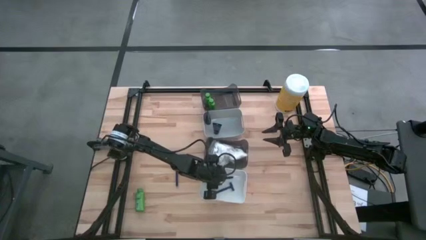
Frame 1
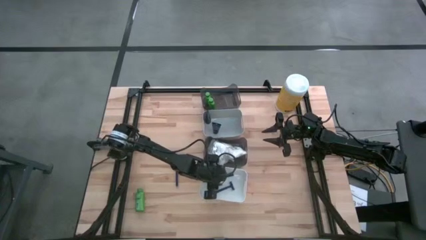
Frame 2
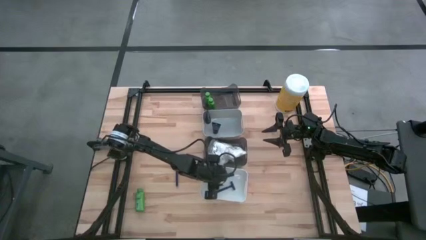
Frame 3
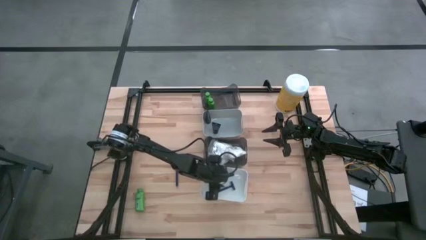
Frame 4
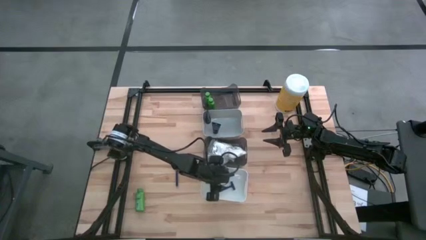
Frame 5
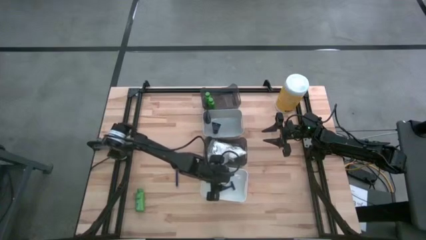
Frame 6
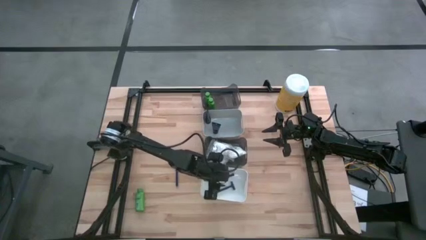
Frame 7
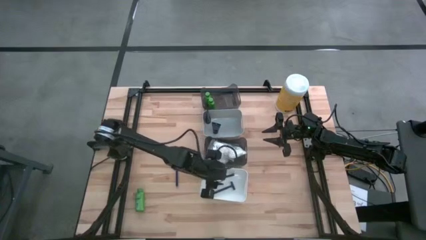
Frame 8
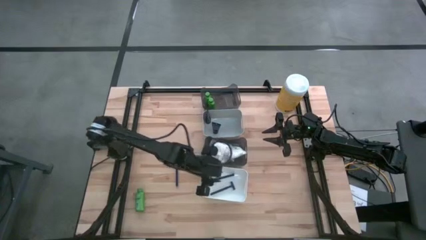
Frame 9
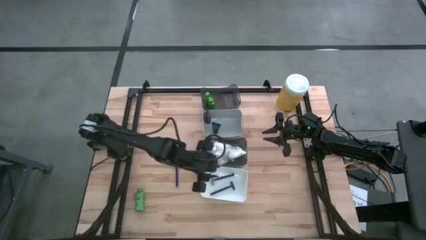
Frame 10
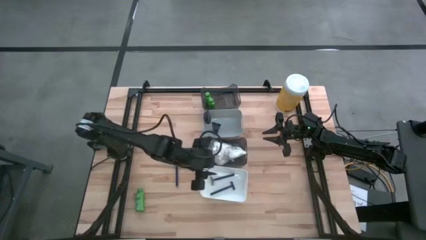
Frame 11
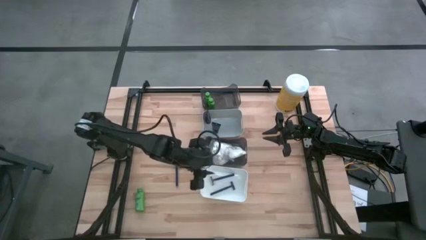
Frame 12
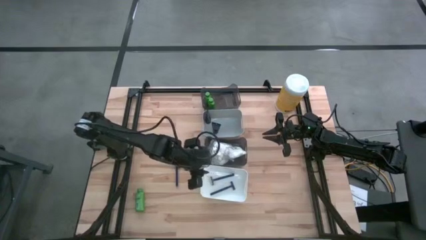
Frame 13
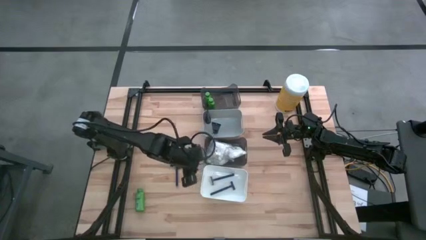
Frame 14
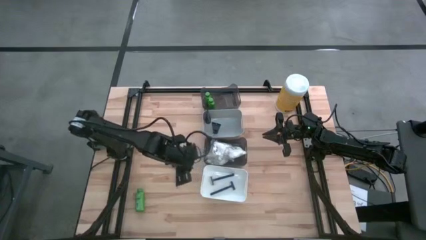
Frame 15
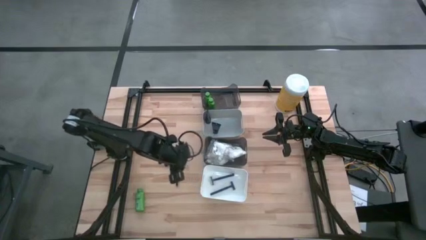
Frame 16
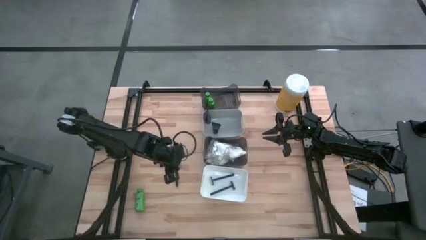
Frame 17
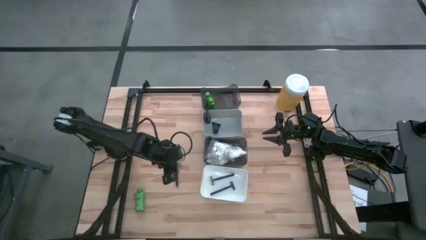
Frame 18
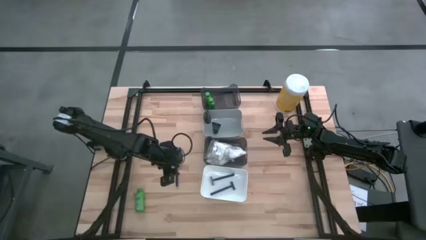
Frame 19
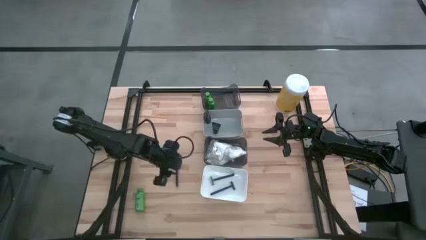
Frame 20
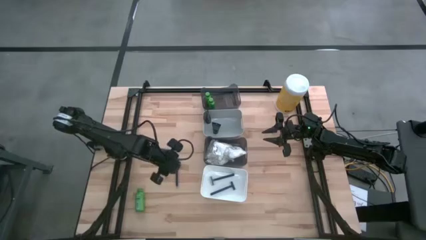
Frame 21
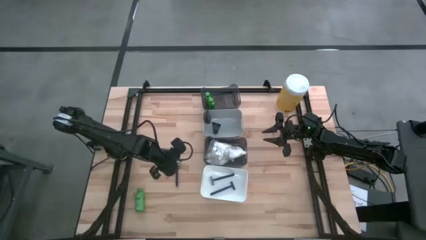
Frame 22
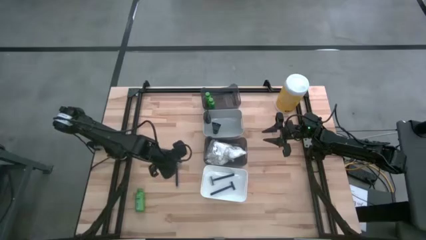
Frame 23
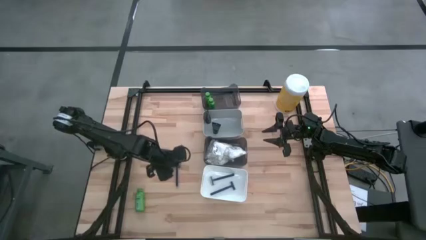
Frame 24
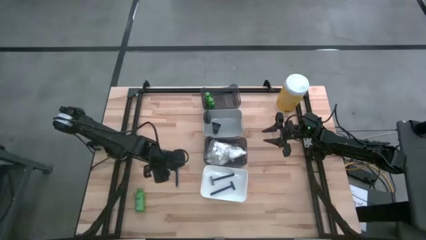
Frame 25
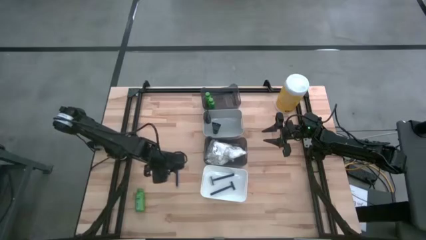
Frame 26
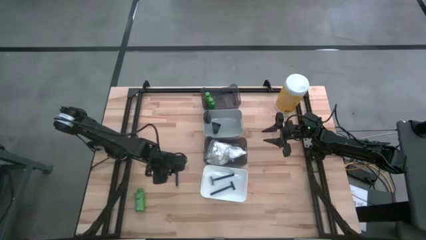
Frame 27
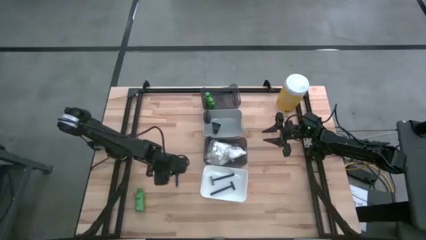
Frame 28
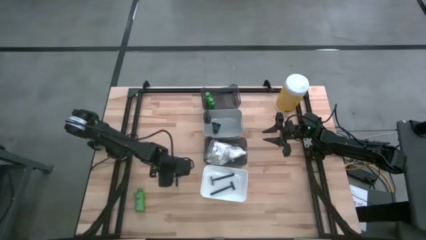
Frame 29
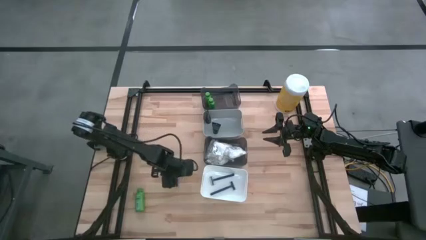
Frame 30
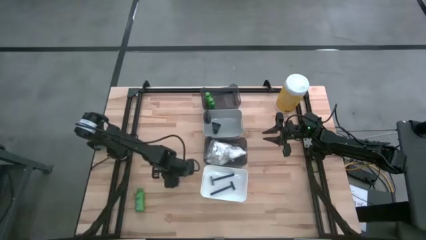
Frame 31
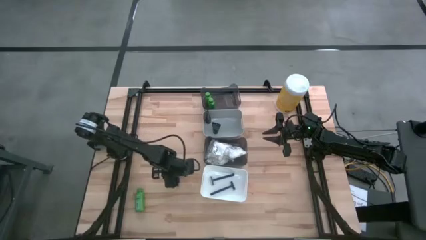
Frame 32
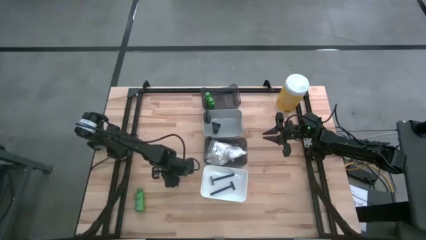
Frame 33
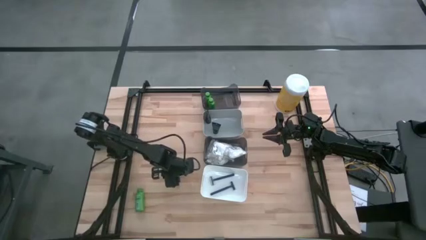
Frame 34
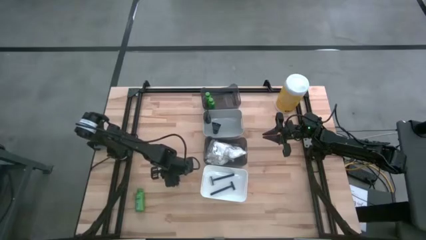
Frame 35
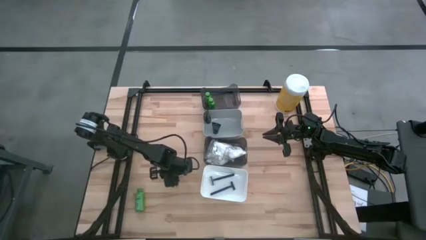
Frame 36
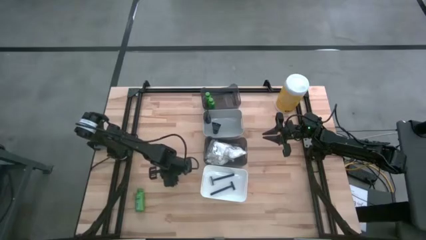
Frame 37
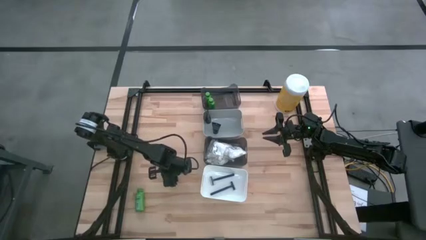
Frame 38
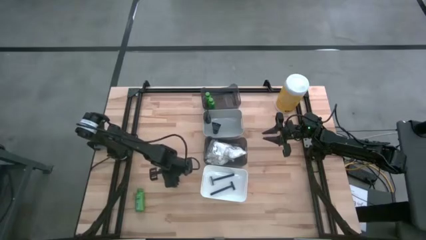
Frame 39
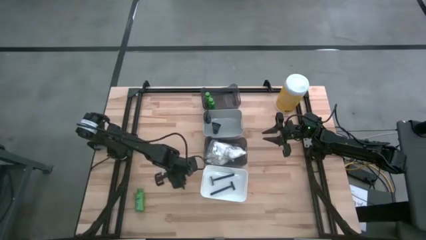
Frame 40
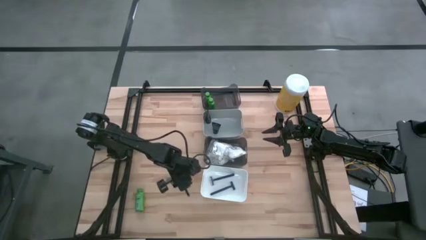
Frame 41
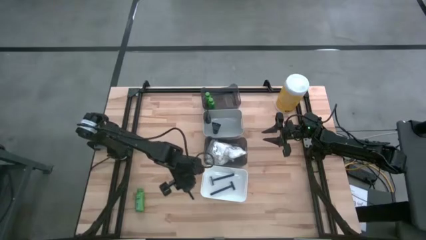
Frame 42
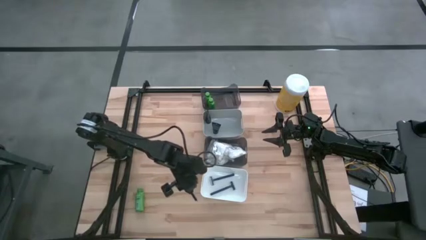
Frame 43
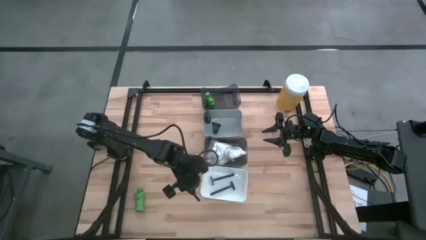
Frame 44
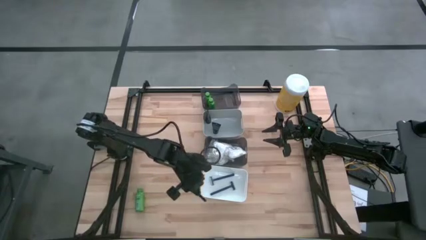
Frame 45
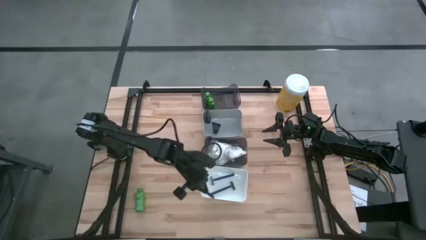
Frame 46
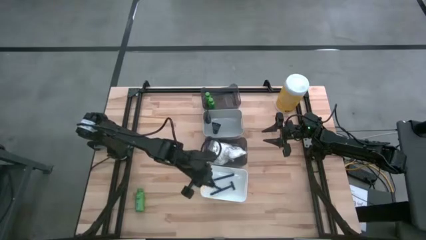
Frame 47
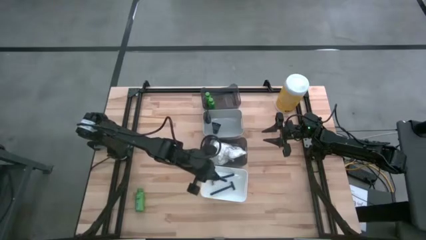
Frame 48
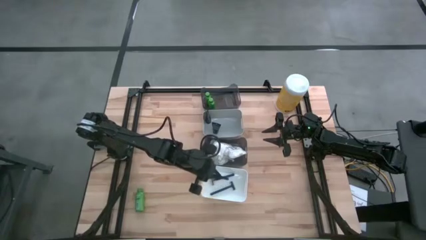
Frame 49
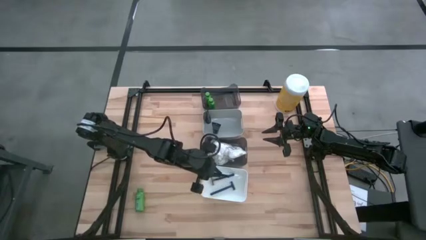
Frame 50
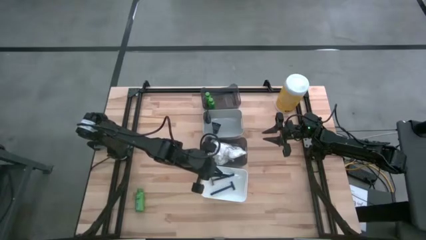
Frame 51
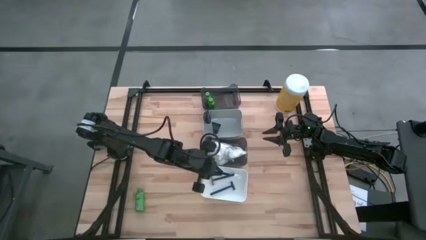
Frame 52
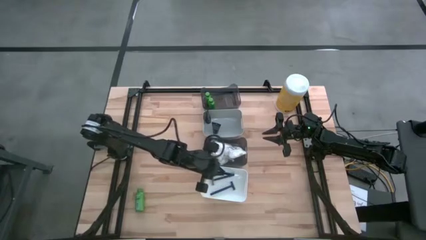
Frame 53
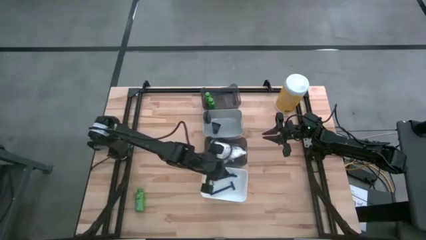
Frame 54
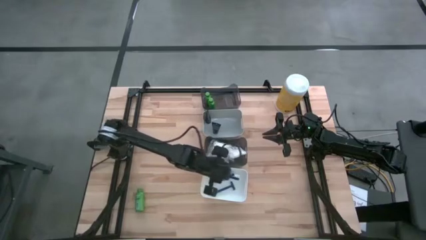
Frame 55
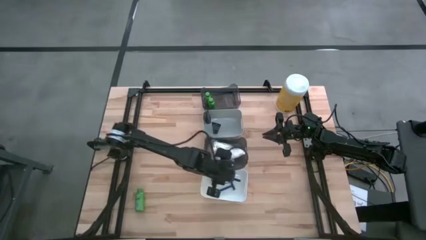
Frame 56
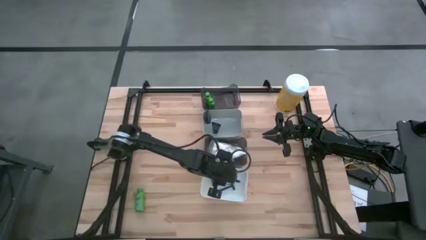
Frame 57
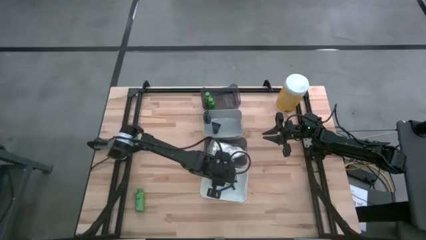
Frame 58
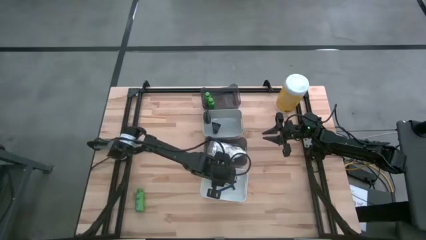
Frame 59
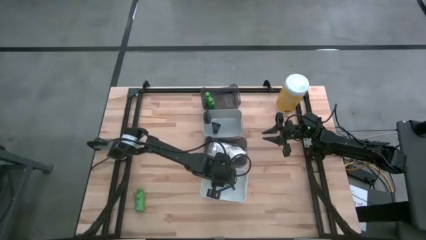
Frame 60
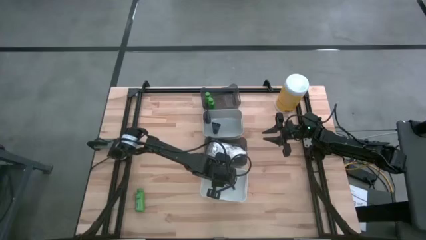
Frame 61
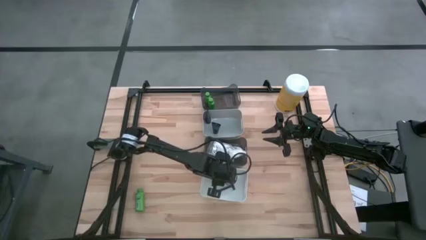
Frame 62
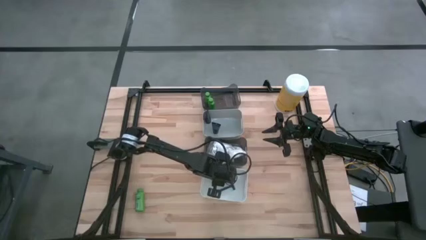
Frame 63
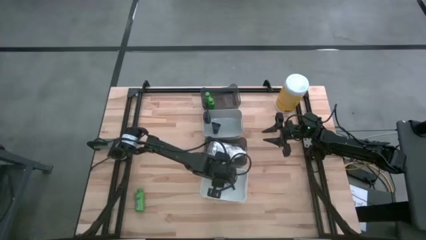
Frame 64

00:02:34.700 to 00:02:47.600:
Task: Pick & Place Travel size toiletries
Put the blue razor into the white bin

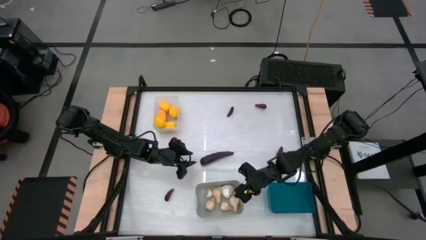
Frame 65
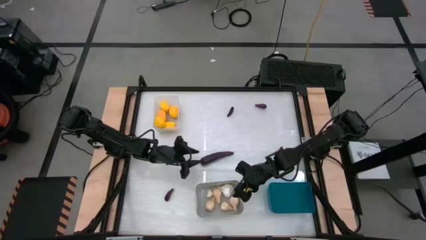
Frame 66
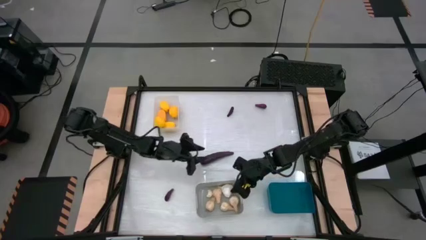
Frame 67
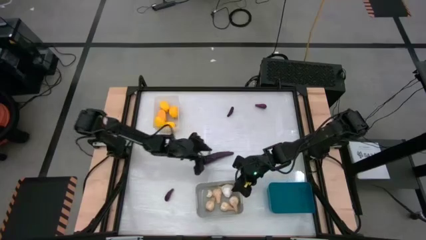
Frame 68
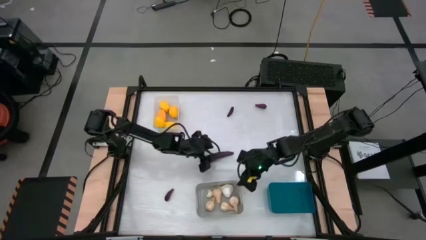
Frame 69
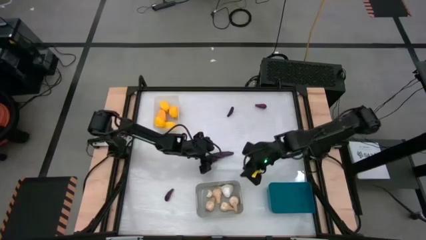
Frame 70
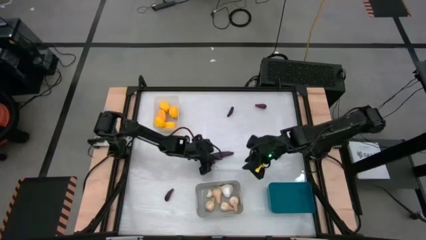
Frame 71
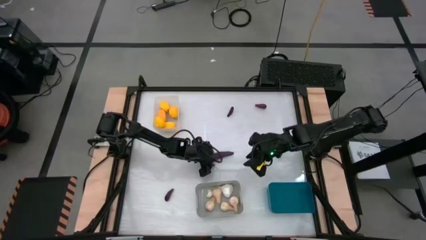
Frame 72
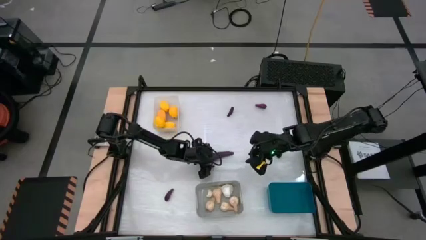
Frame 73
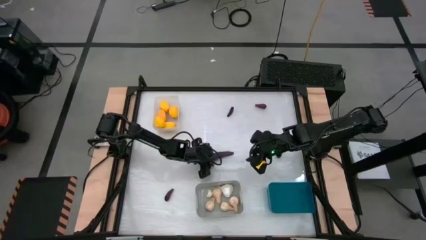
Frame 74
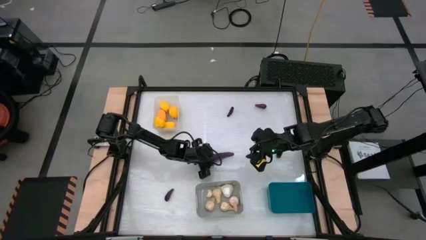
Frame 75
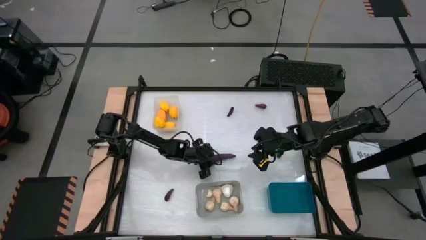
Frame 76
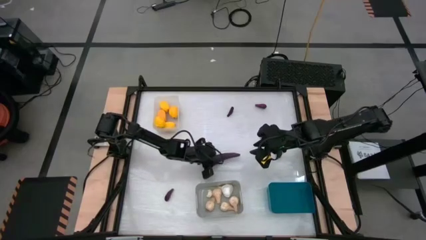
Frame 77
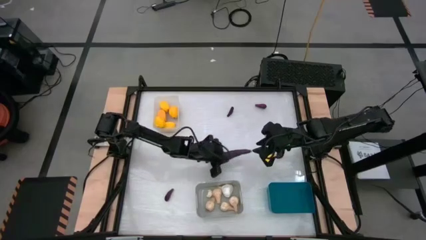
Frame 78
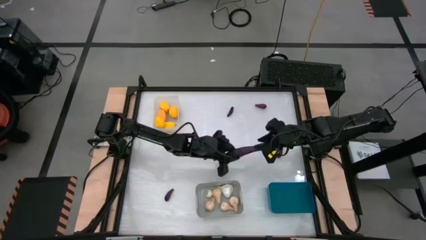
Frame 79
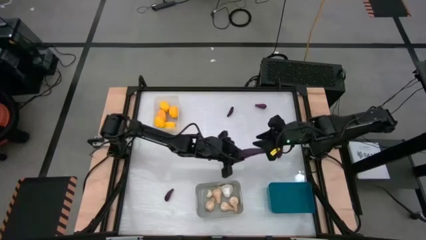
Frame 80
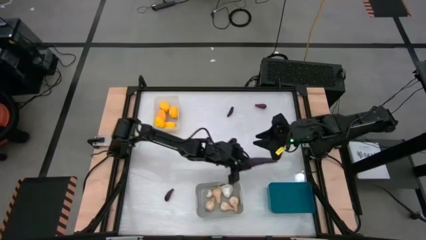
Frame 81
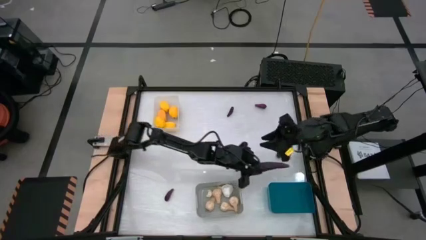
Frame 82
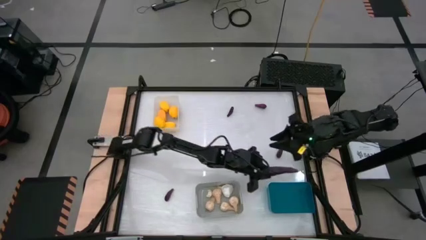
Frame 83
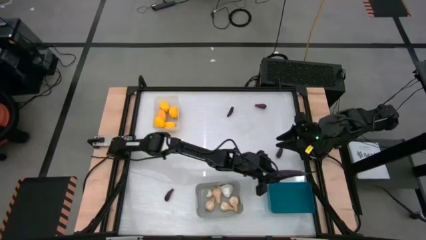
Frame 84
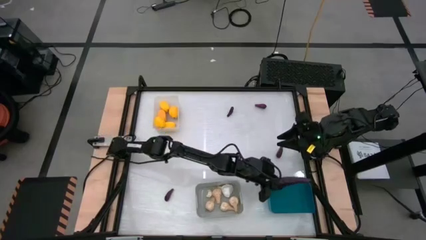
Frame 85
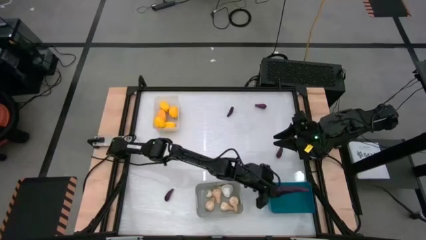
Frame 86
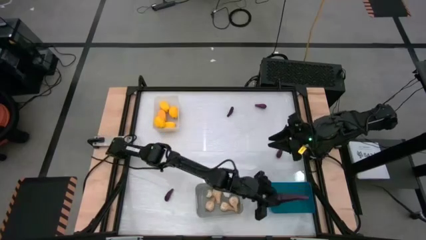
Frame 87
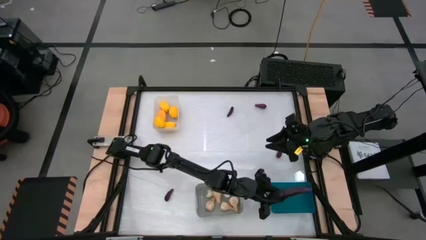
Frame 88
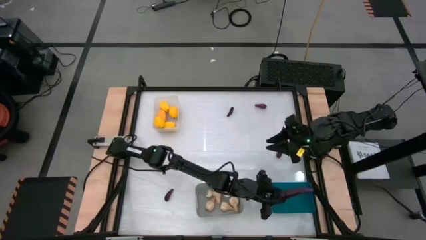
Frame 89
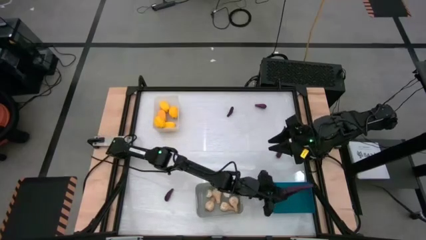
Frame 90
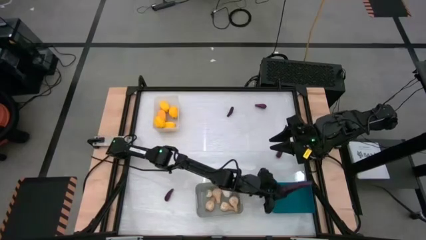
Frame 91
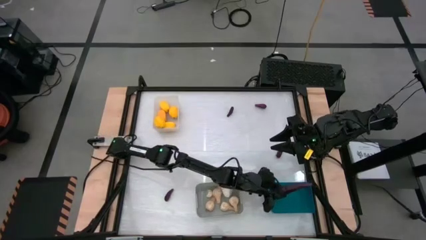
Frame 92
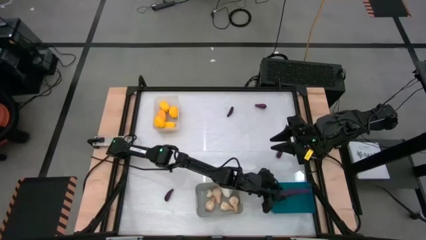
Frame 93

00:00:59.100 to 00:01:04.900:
Task: Sort produce into baskets
Put the eggplant into the blue bin
